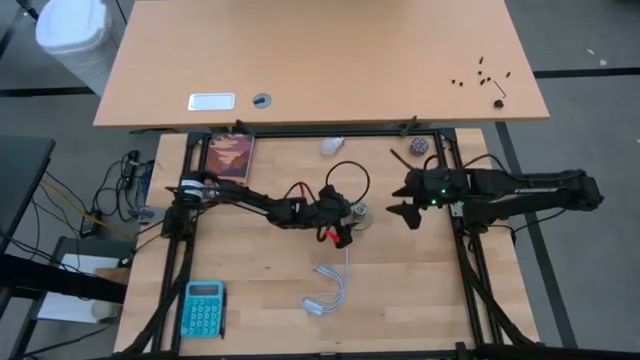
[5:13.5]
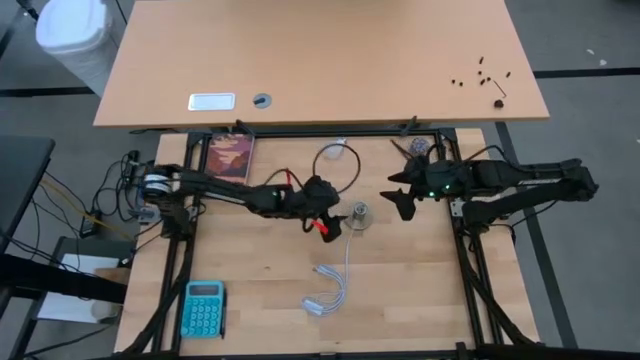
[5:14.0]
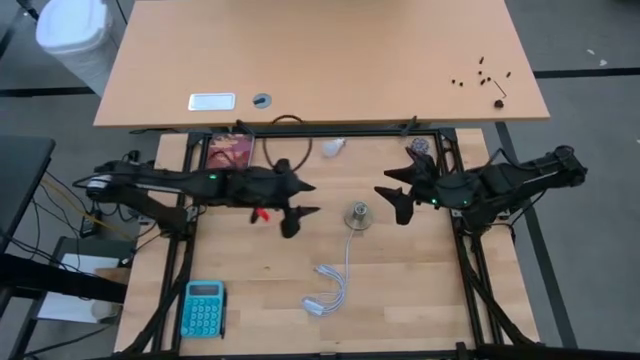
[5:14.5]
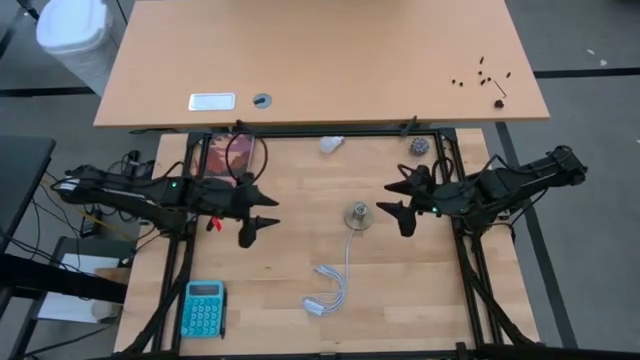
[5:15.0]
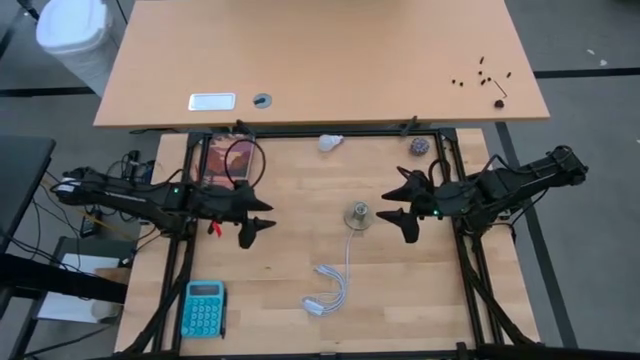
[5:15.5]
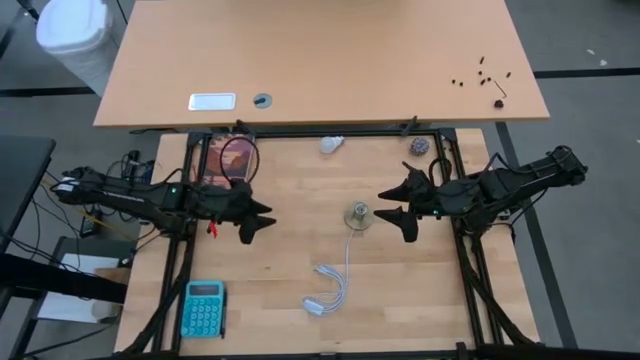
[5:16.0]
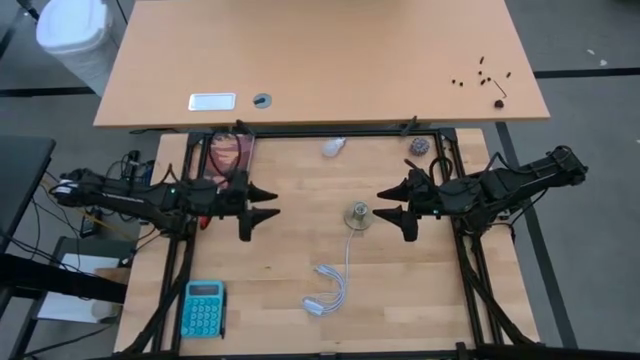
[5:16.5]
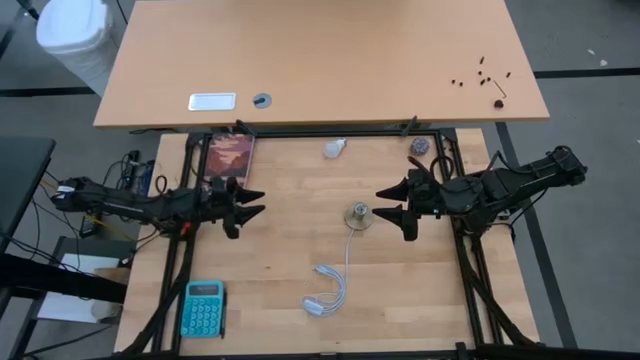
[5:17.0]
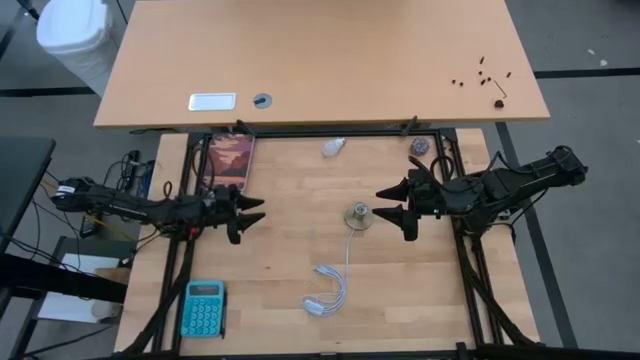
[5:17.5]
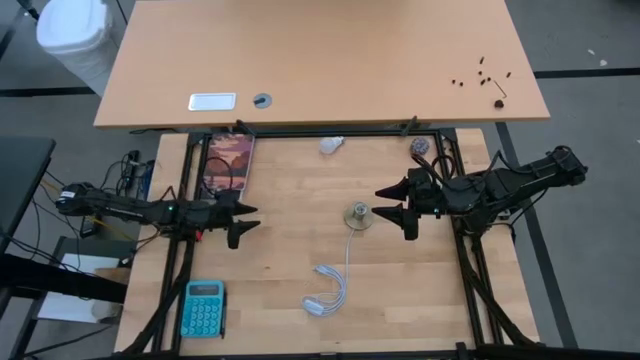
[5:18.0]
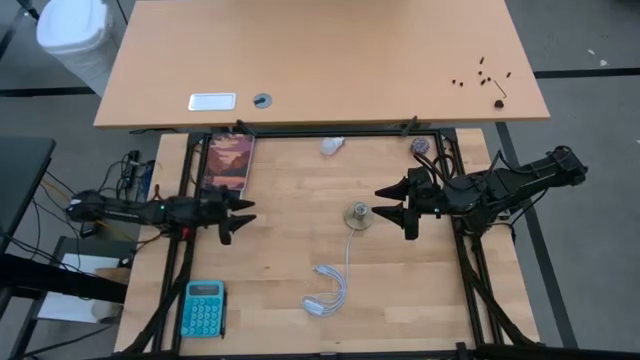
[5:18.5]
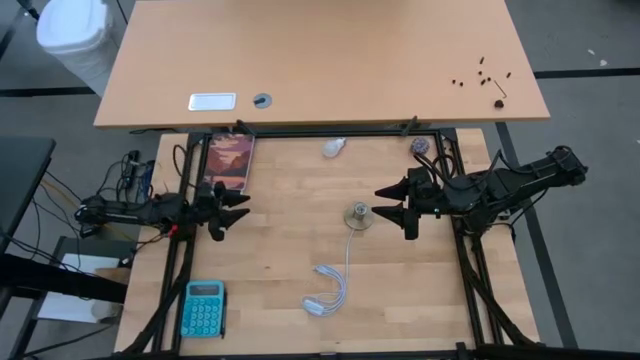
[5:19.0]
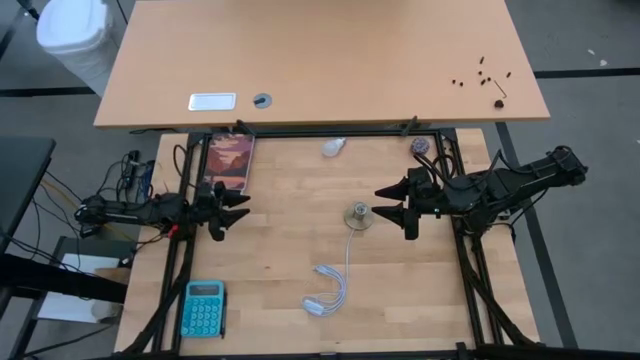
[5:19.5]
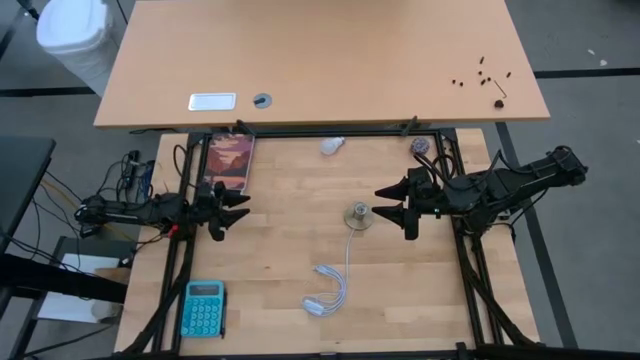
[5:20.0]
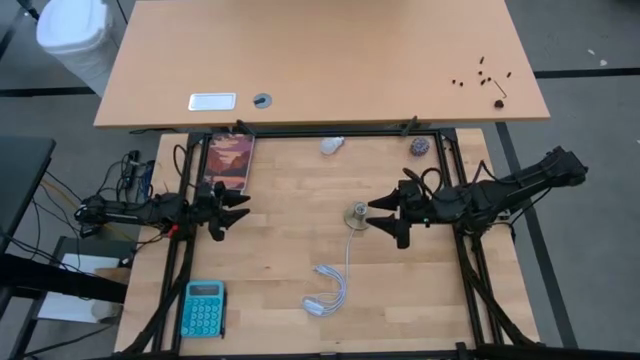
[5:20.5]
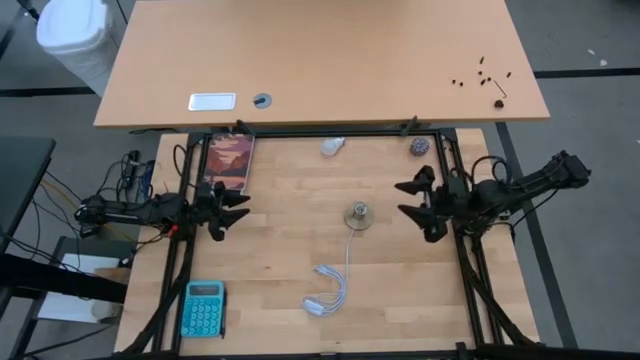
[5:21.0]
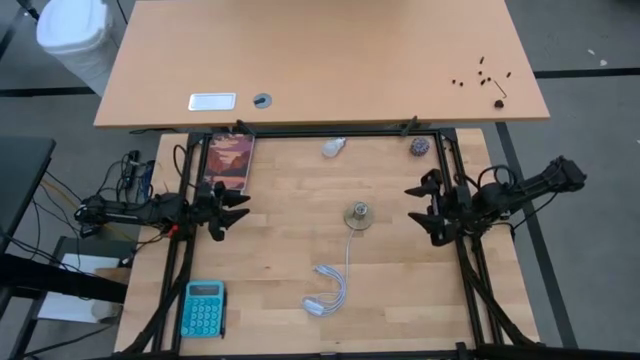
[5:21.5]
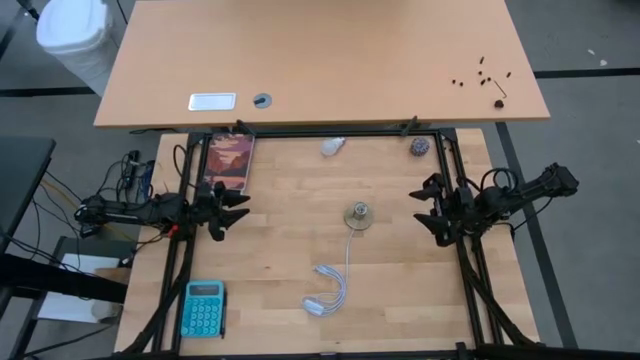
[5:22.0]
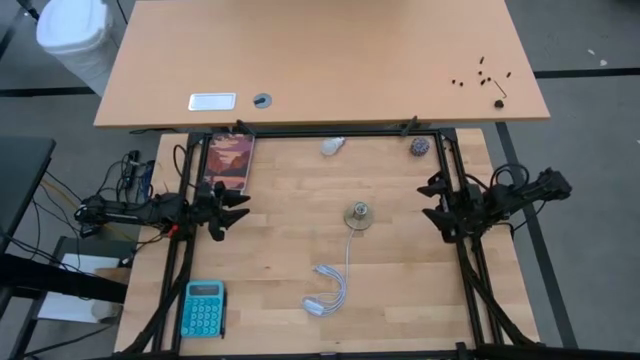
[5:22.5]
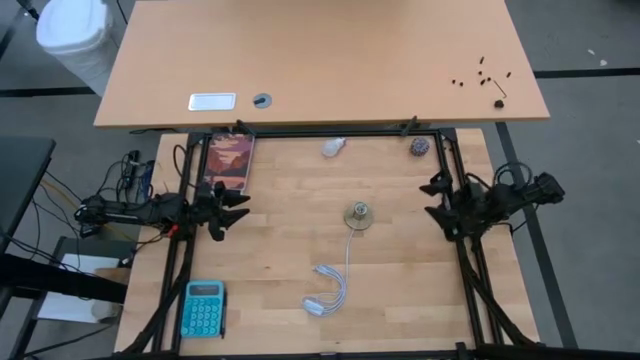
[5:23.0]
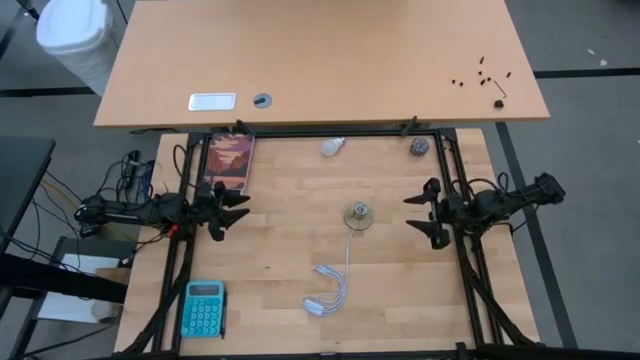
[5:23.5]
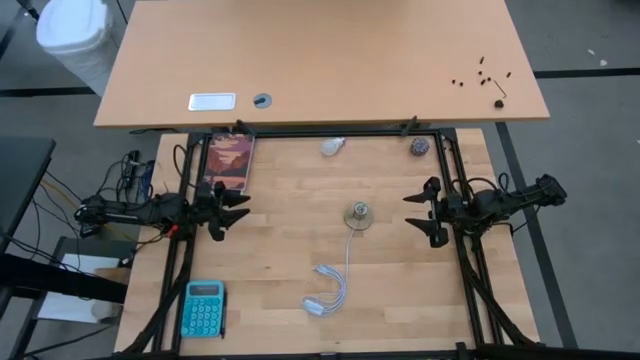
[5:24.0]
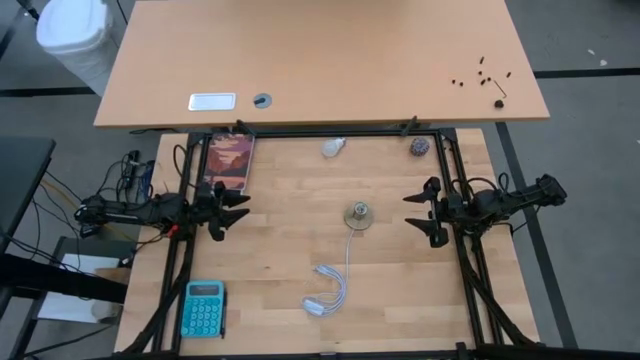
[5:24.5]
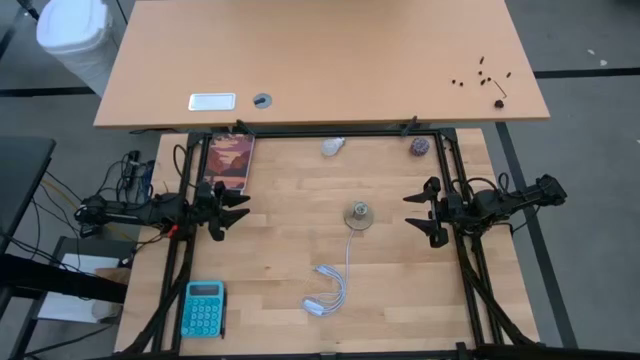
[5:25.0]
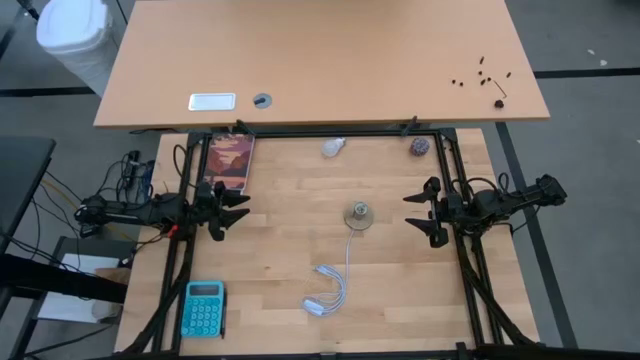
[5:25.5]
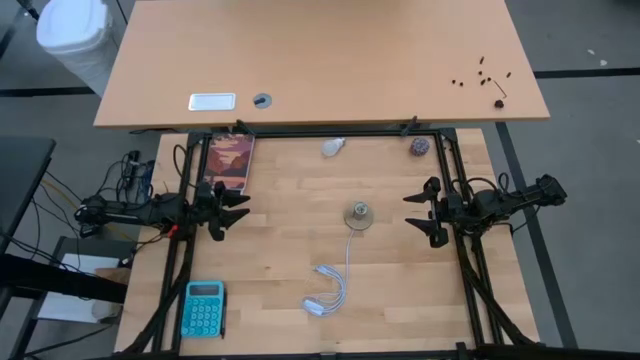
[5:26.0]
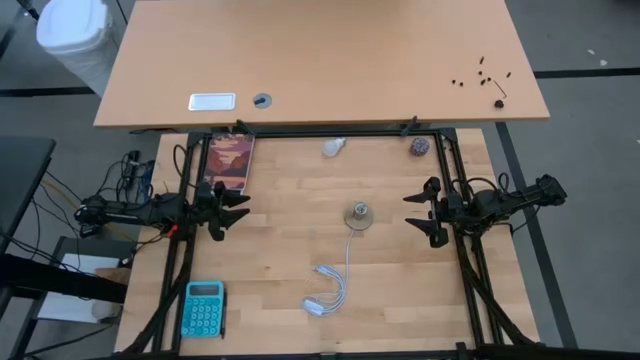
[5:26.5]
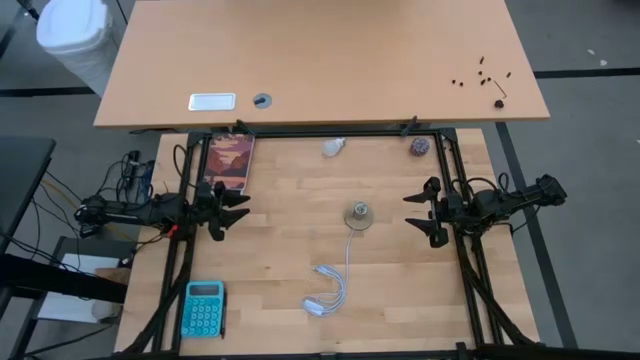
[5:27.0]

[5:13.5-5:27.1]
Task: Screw lightbulb
Return to Home Position

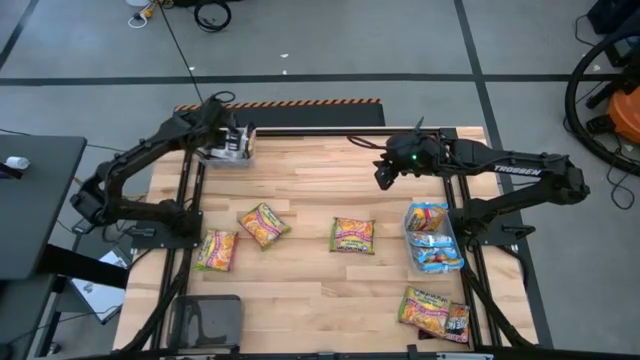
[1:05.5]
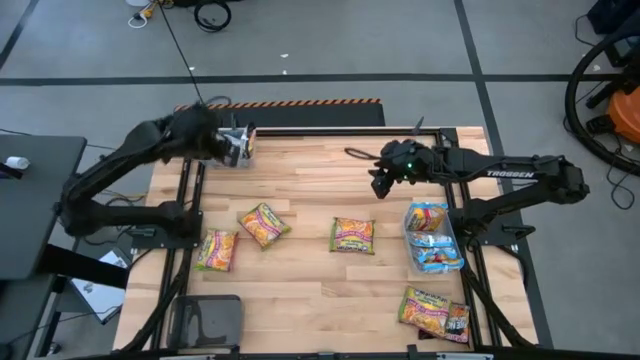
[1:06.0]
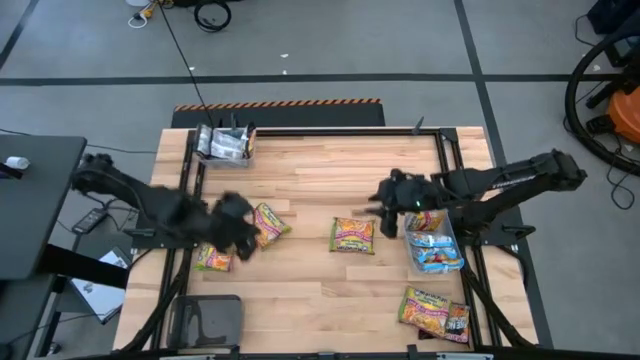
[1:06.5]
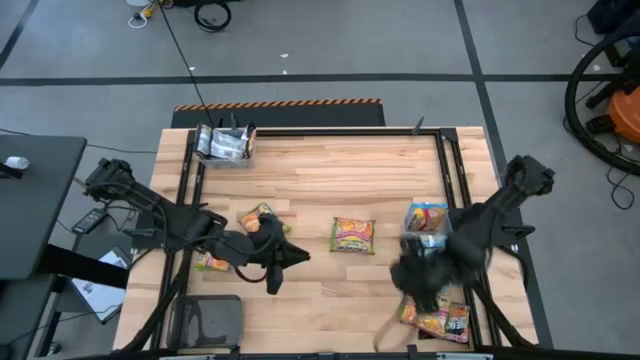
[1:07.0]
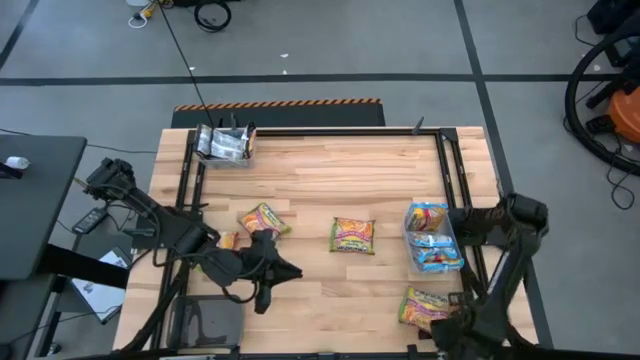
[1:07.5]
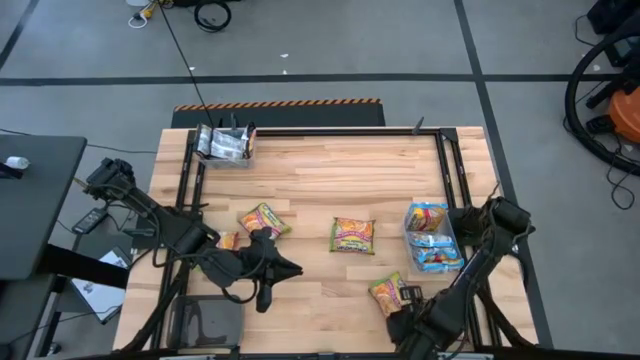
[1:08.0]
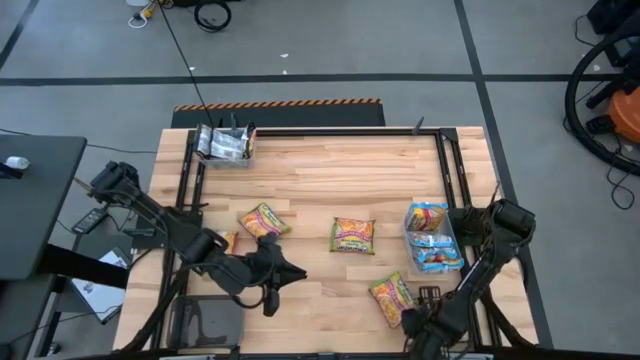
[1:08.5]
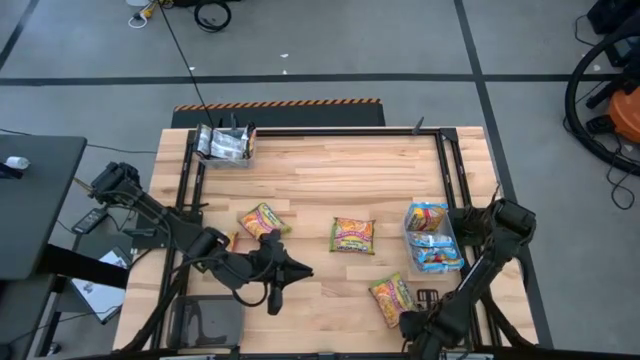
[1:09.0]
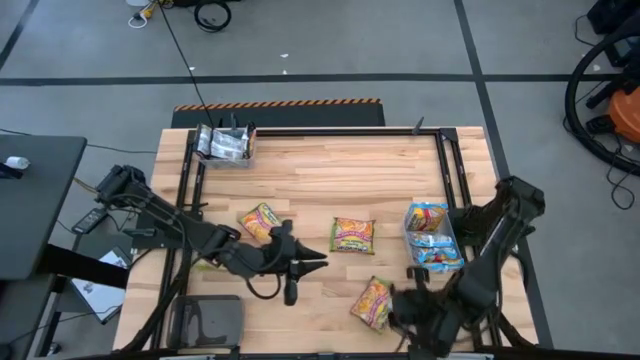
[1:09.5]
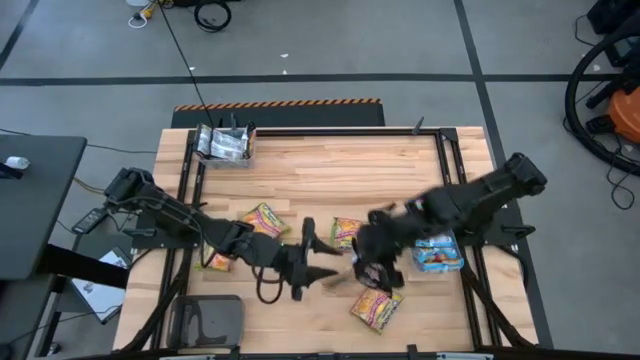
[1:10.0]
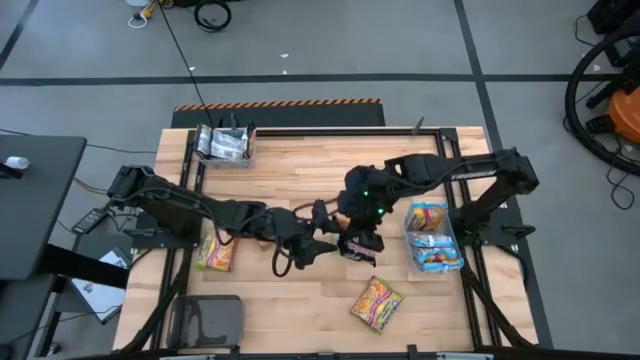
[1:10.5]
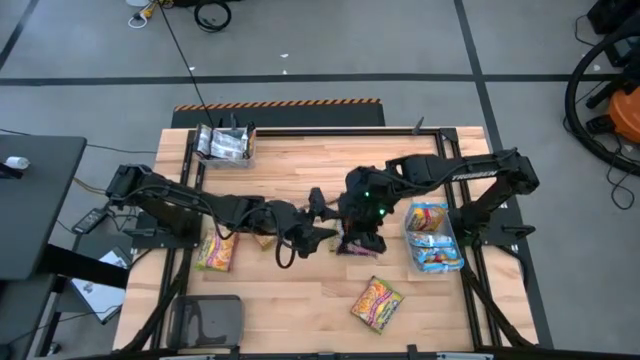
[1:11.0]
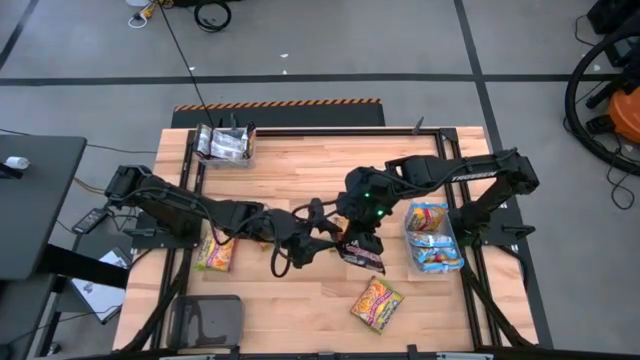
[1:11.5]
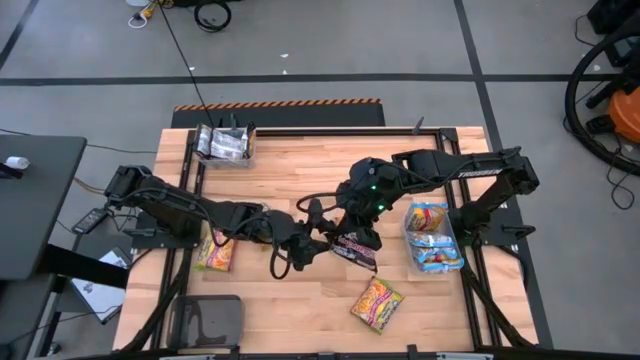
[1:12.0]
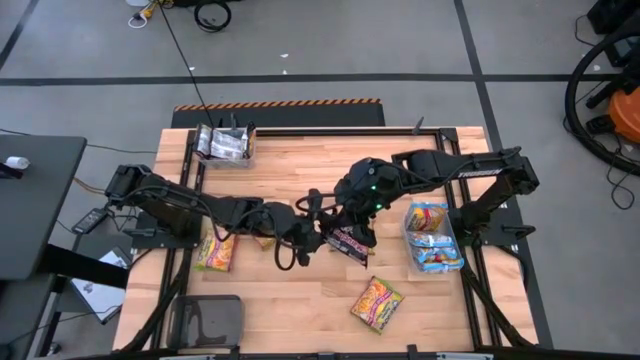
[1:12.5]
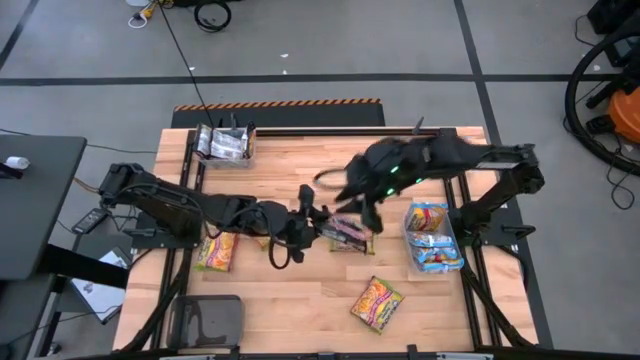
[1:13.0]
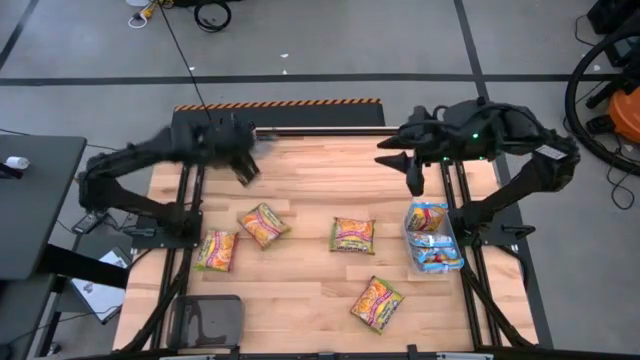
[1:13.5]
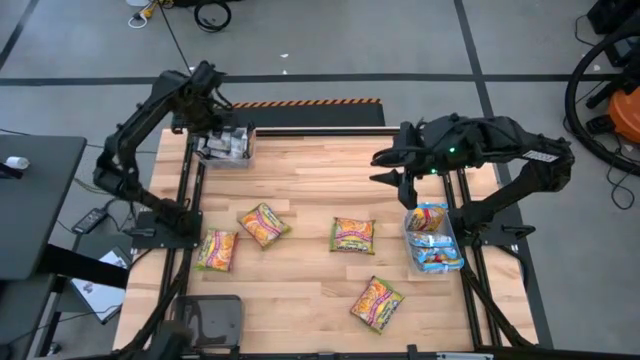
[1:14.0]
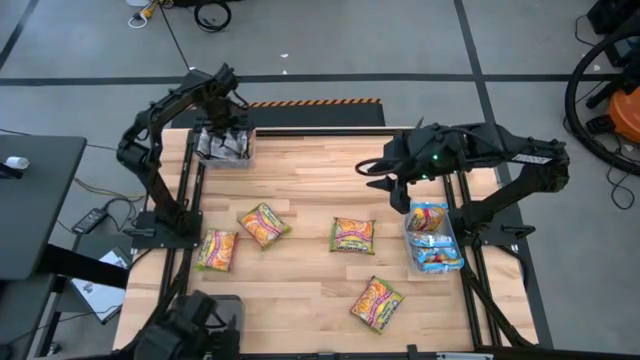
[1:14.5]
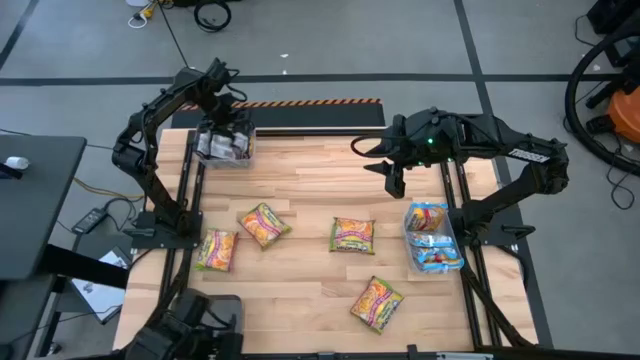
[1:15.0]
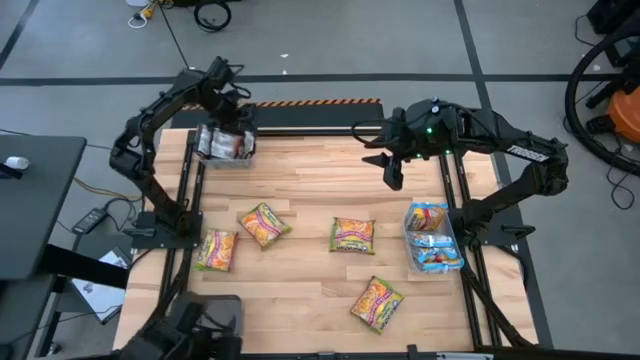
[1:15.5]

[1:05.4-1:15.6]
Task: Sort Maruchan noodles
Put the black noodle pack into the top transparent bin
